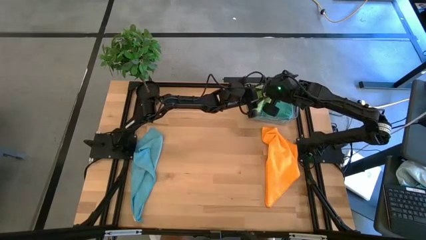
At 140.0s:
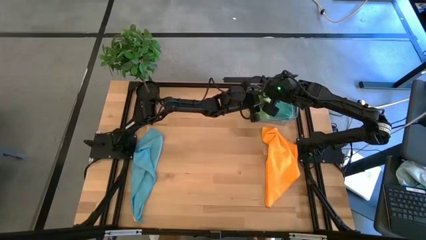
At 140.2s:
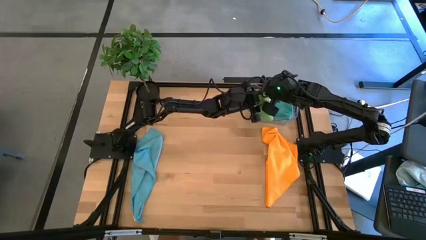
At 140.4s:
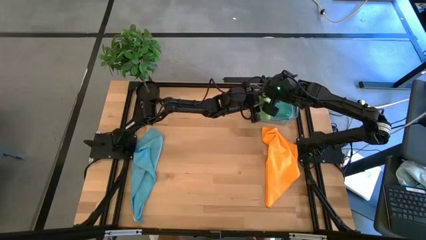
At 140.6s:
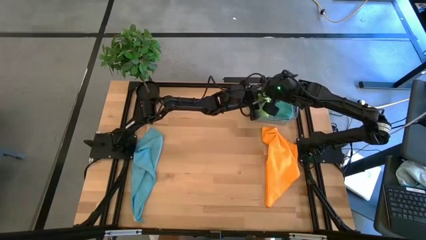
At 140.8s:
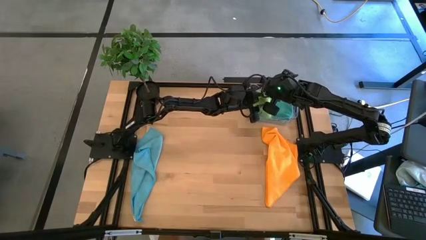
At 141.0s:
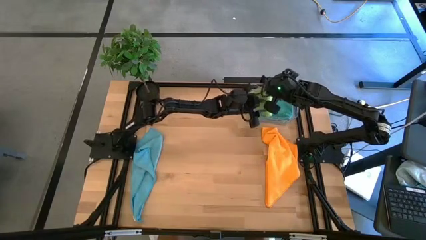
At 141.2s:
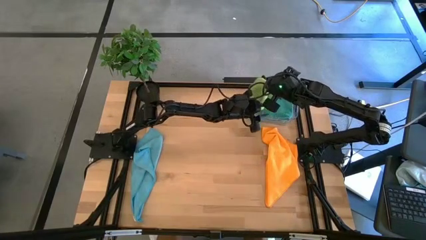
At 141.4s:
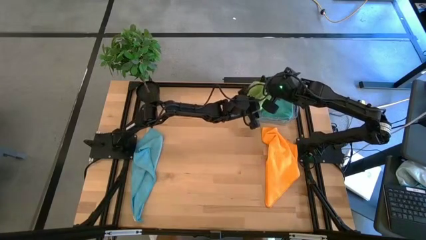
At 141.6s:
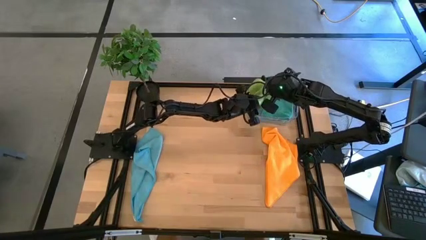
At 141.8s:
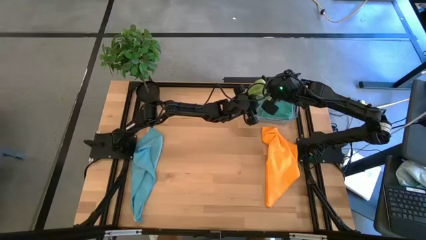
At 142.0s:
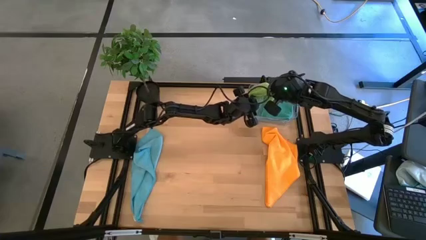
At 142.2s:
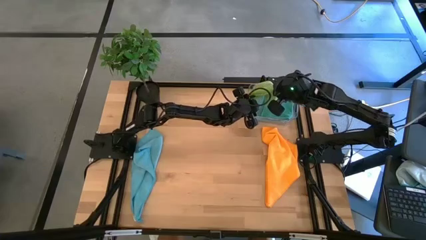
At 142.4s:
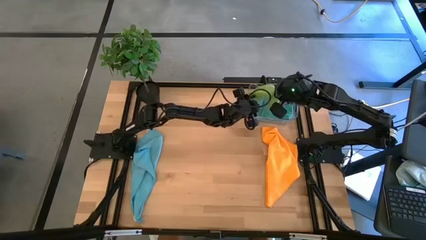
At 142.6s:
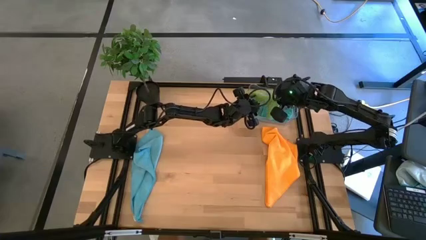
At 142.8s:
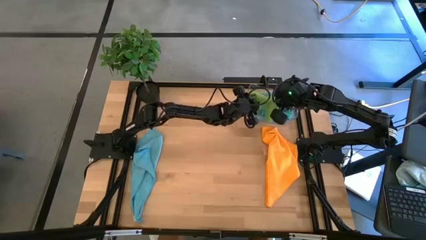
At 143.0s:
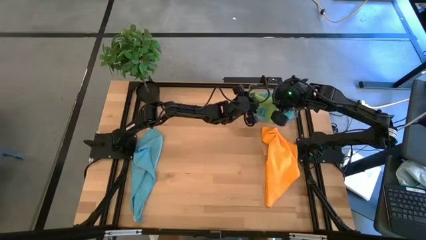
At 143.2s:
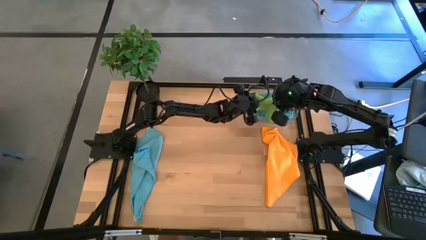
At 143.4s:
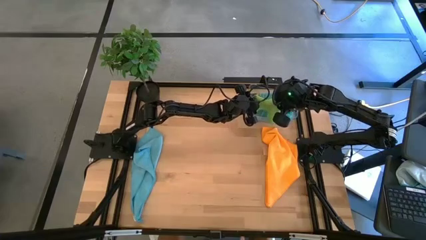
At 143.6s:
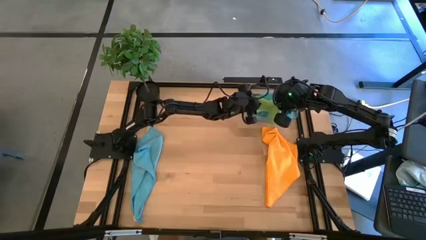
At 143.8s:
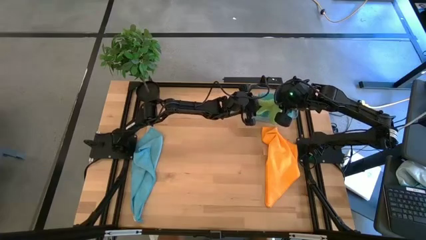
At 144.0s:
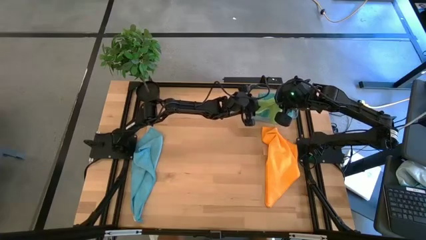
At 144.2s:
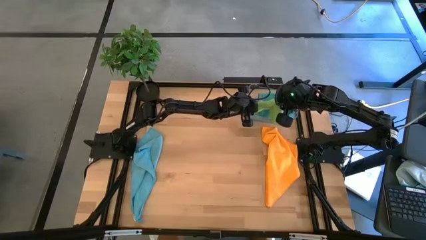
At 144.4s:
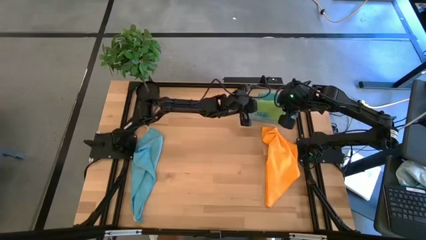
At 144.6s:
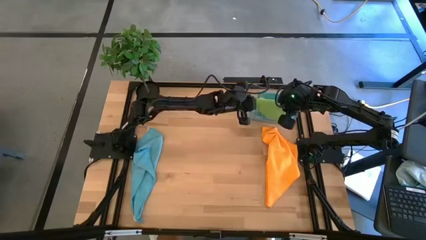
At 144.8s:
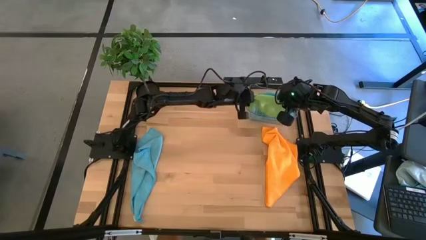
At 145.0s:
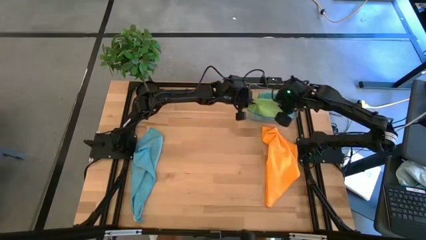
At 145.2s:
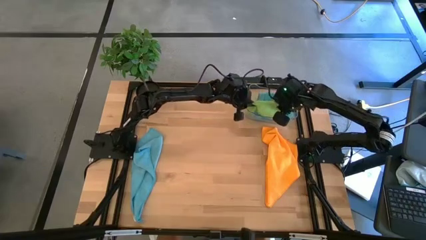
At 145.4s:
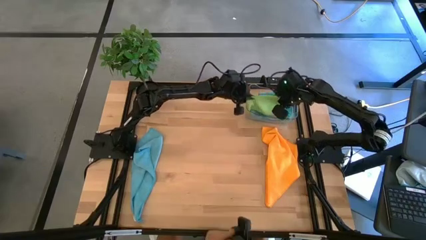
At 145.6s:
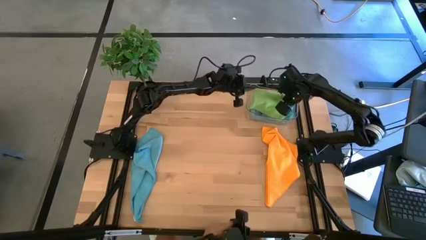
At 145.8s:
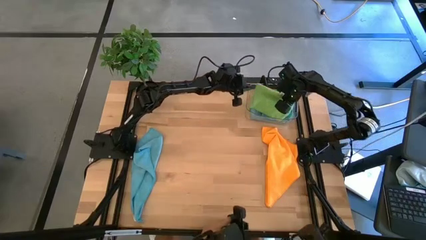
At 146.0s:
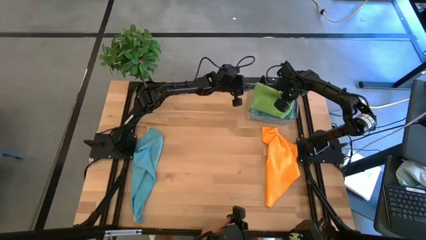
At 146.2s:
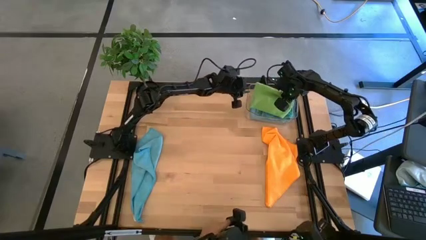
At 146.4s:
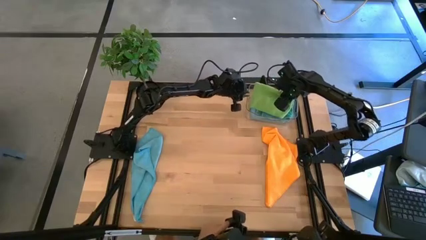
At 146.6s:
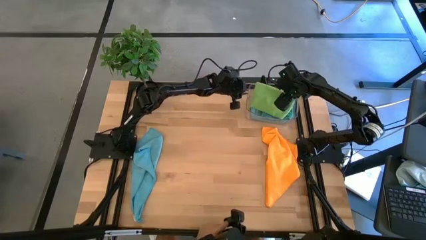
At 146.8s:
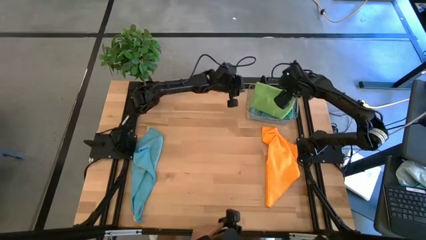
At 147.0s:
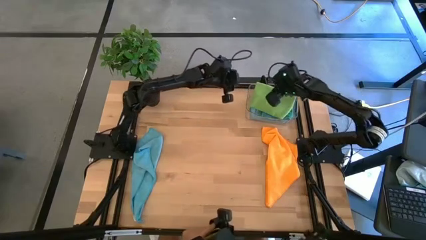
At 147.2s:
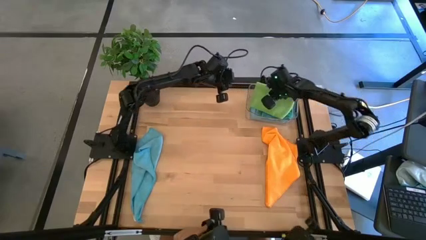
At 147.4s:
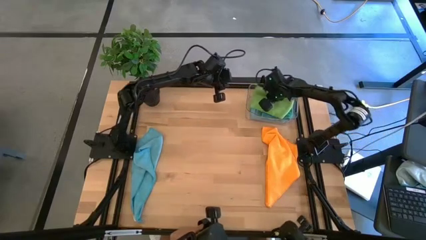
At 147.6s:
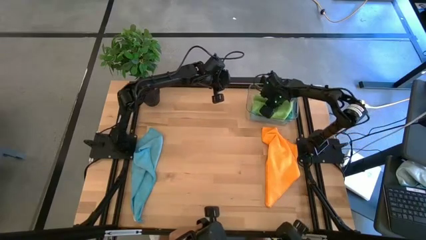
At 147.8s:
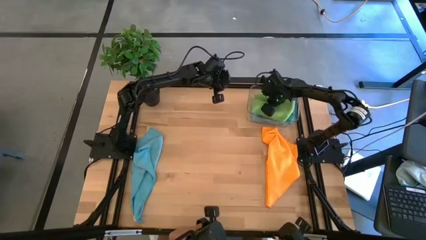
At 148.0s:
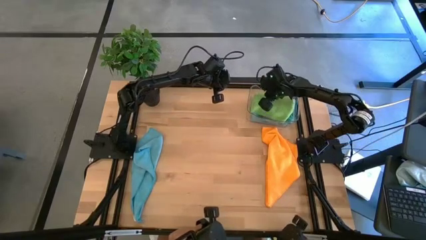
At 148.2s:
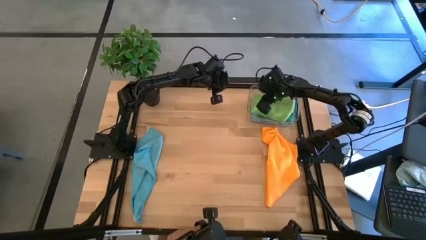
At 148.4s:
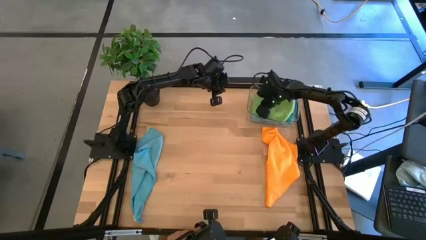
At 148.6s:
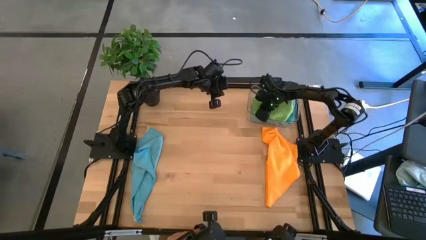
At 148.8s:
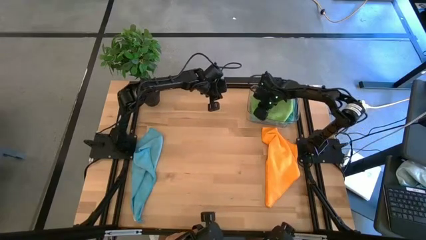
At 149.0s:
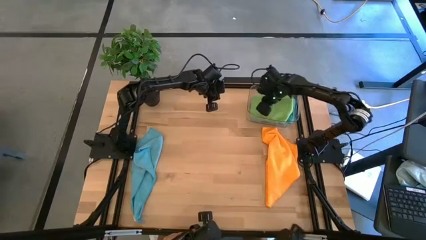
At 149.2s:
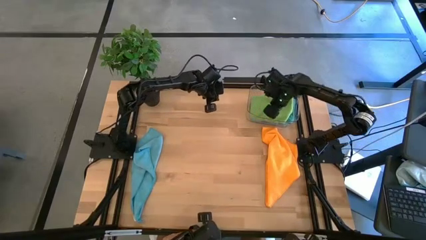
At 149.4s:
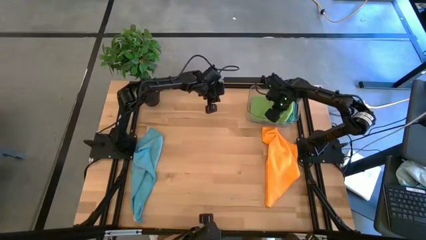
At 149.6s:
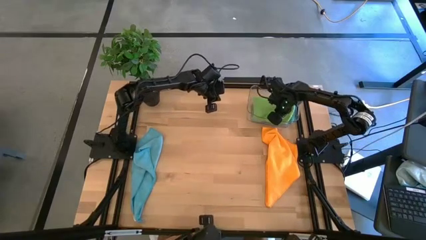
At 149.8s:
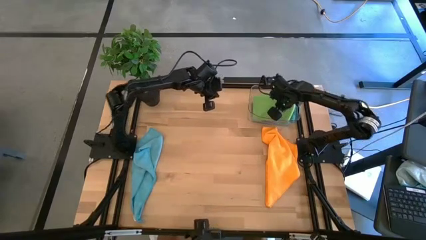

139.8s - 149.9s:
Task: Fold microfiber towels
Put the folded green microfiber towel into the transparent bin

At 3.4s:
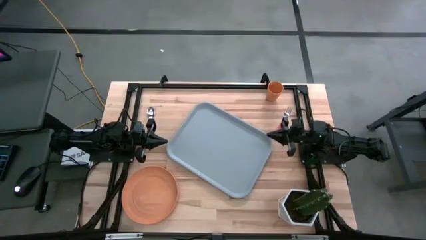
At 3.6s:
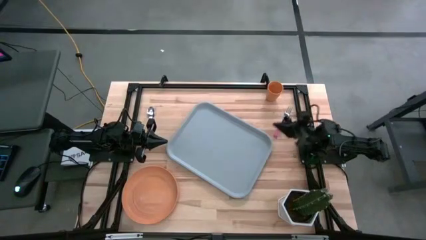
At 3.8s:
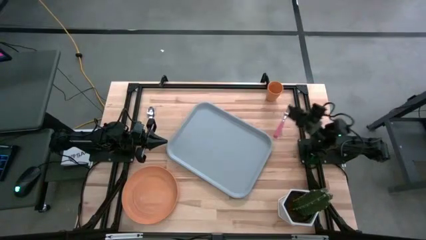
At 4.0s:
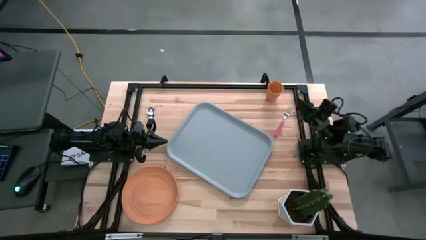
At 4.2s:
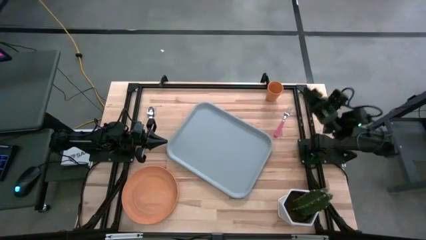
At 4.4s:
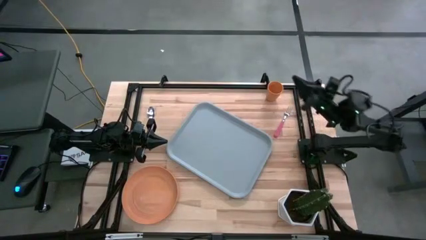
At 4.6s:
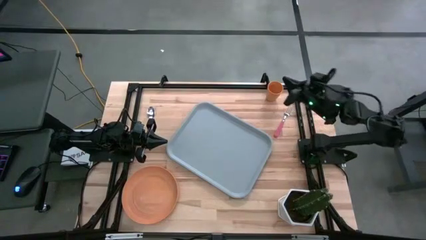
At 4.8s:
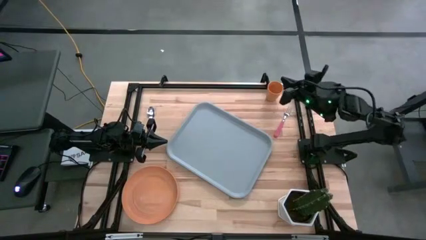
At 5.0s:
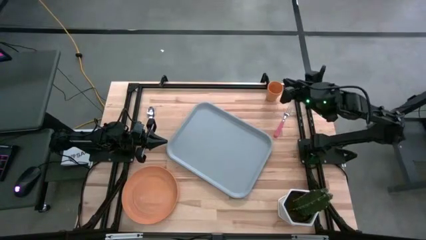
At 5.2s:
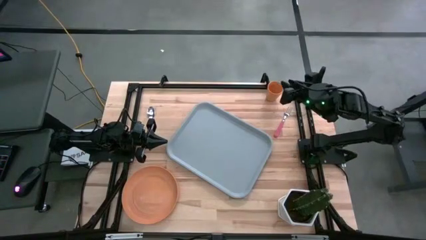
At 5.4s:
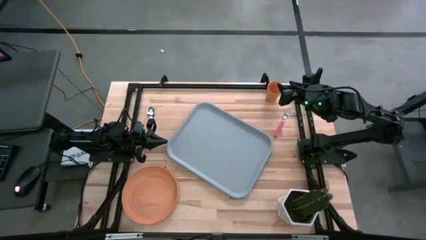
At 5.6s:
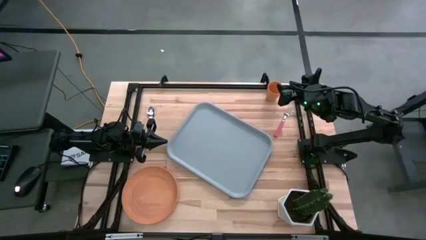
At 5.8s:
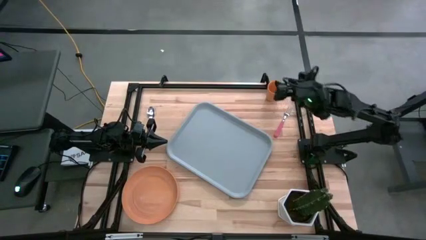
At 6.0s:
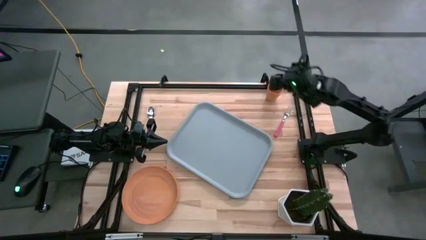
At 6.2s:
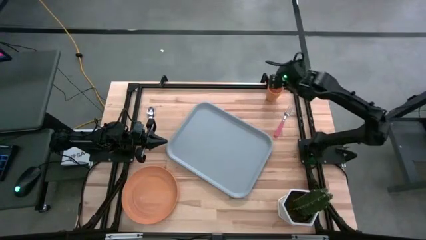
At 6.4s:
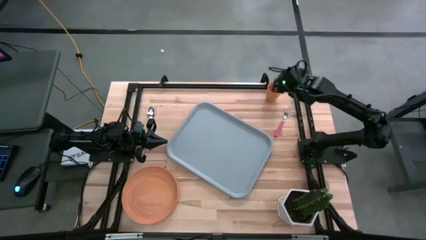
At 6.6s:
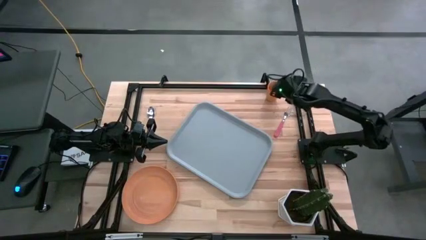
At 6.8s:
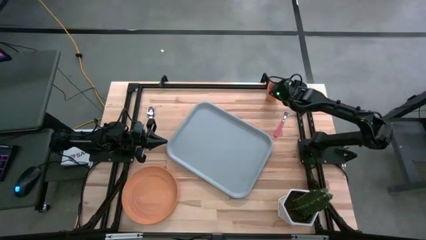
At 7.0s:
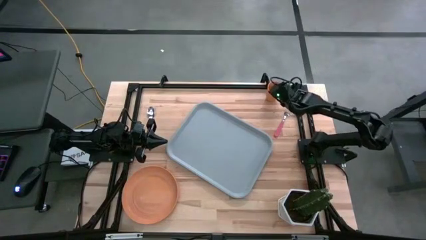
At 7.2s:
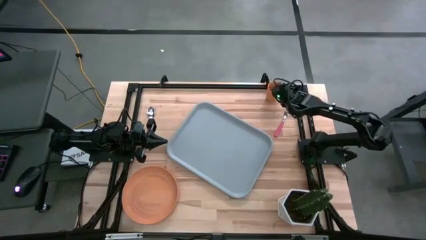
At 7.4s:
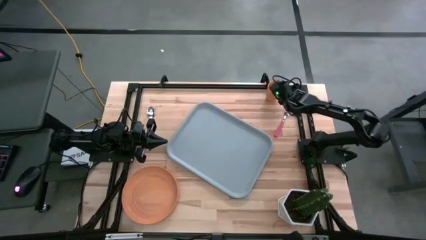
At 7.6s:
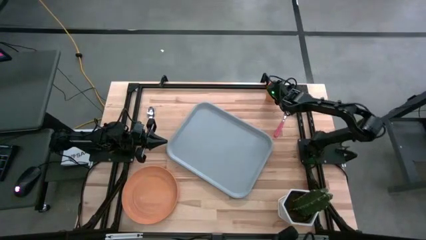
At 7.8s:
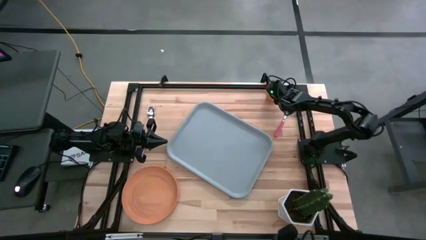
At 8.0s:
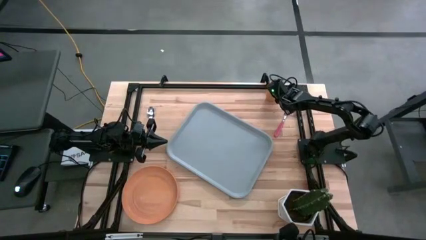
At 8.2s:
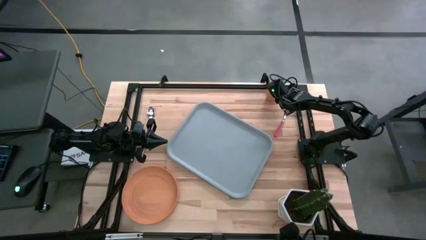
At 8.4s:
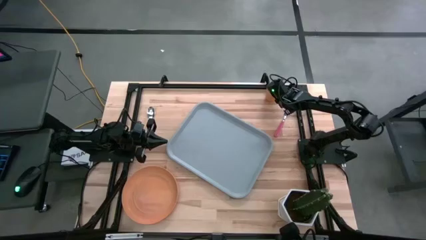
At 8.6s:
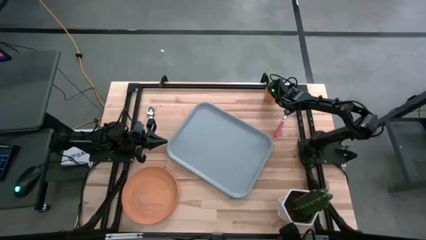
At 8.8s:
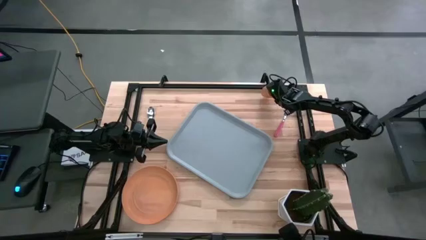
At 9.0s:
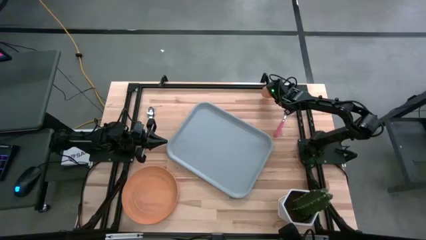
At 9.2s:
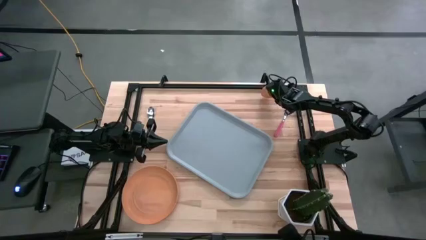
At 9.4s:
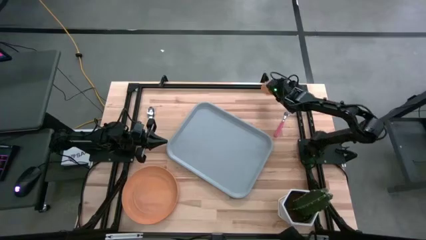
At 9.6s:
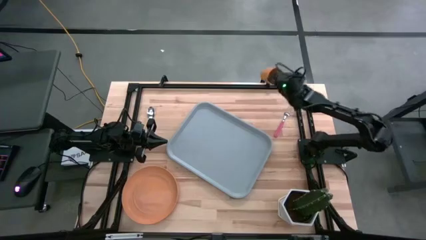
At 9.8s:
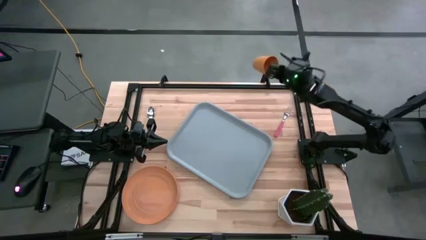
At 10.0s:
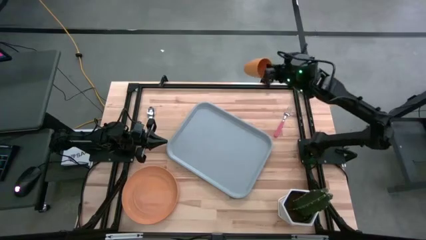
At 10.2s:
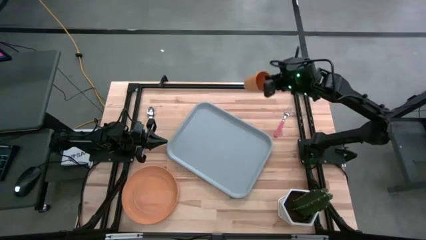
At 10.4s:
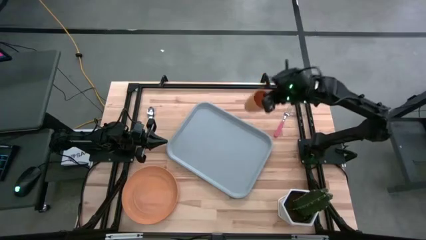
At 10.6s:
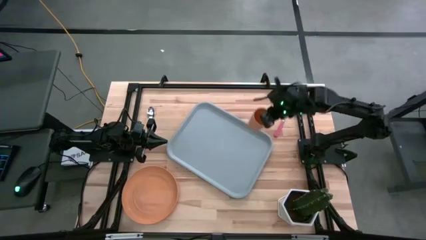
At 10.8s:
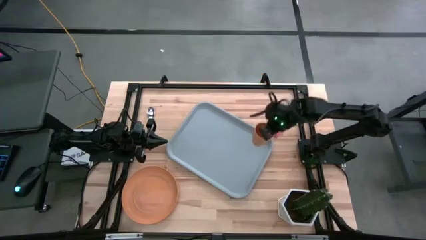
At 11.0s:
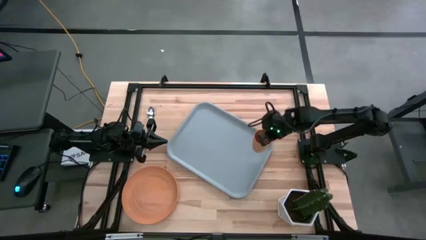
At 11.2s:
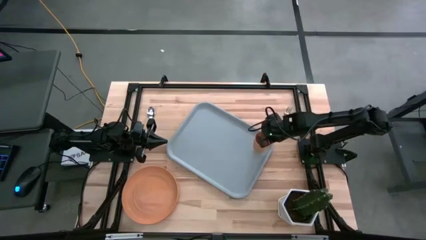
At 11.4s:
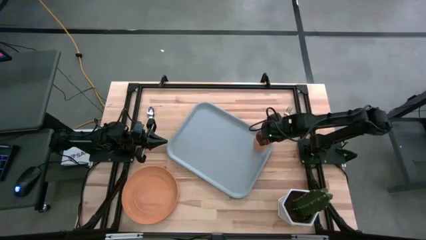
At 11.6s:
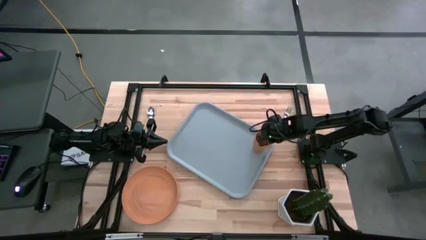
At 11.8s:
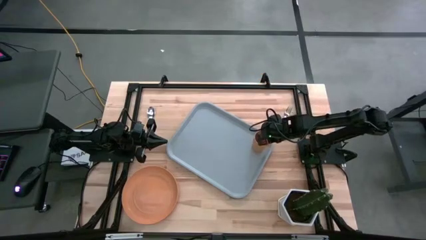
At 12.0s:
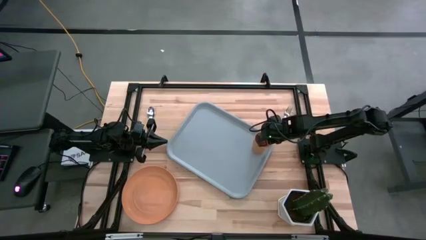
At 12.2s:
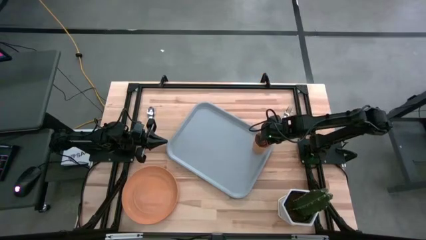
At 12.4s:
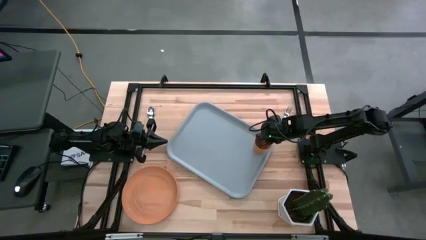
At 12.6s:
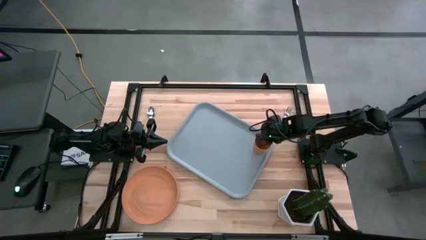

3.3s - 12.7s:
Task: Pick and place plate/cup/fork/spoon on tray
Put the yellow cup on the top right of the gray tray
